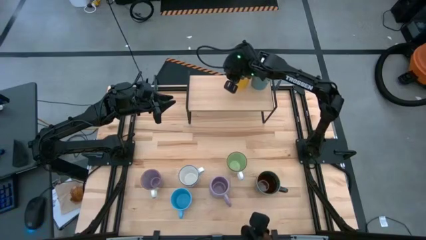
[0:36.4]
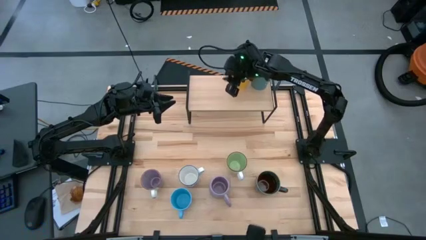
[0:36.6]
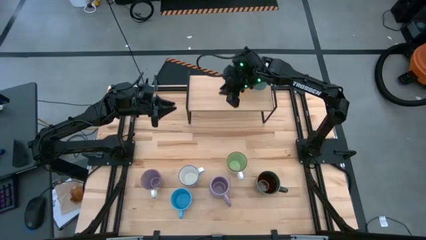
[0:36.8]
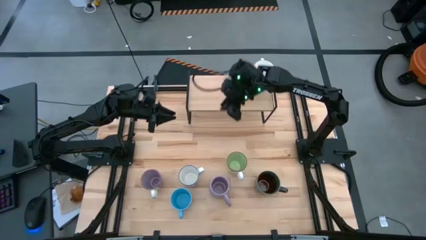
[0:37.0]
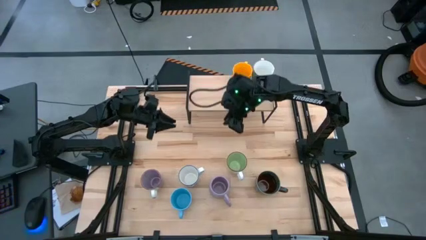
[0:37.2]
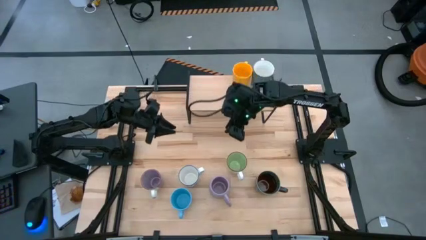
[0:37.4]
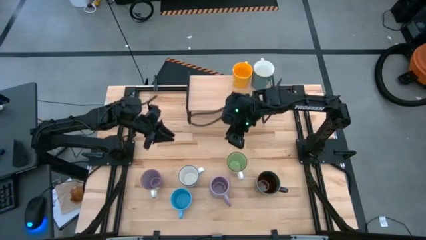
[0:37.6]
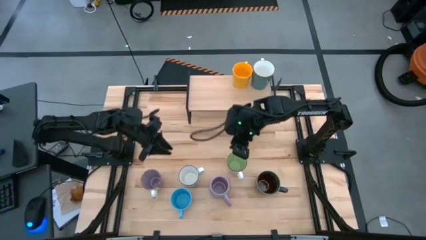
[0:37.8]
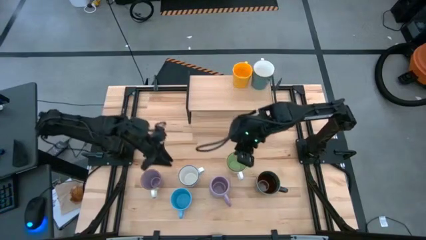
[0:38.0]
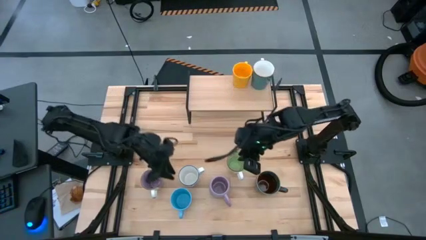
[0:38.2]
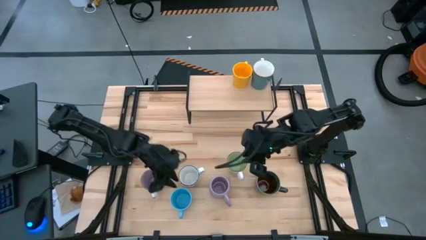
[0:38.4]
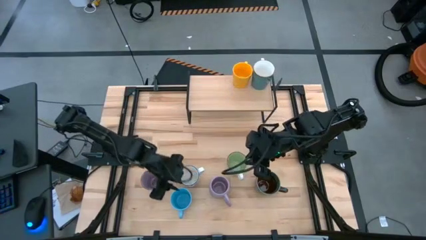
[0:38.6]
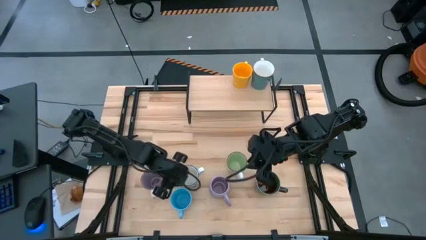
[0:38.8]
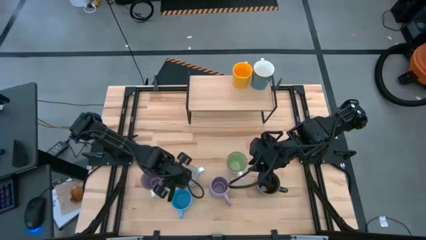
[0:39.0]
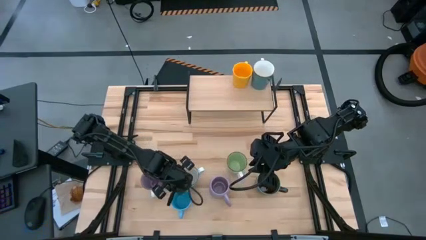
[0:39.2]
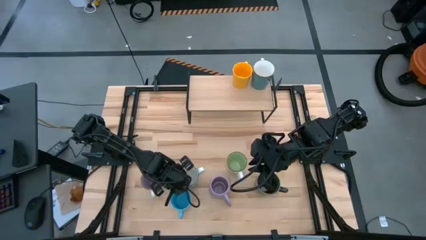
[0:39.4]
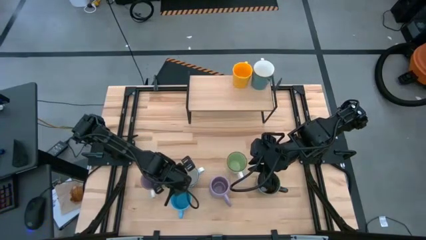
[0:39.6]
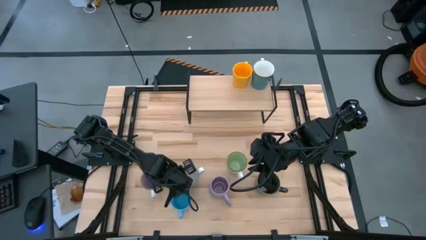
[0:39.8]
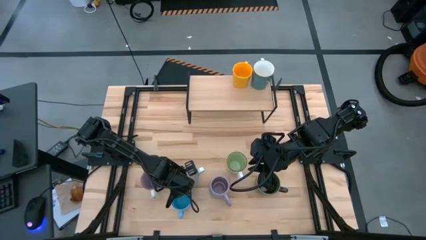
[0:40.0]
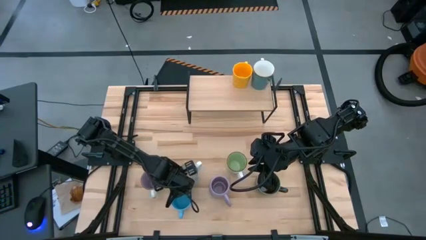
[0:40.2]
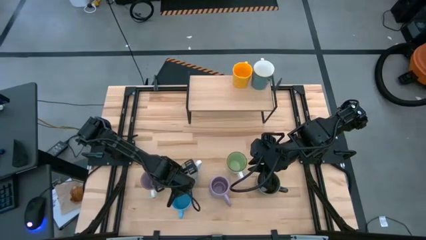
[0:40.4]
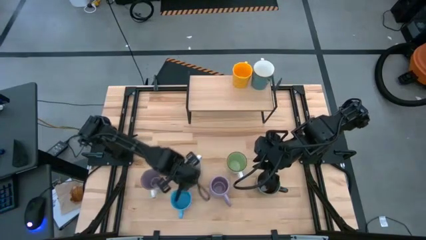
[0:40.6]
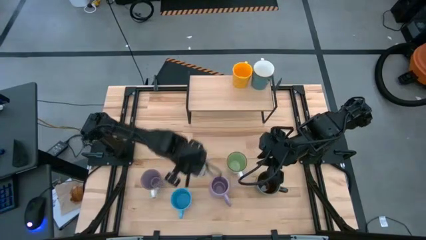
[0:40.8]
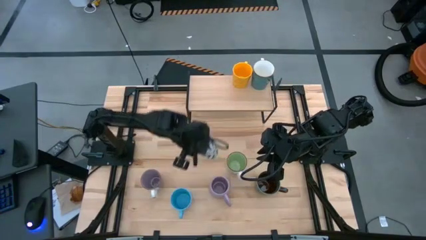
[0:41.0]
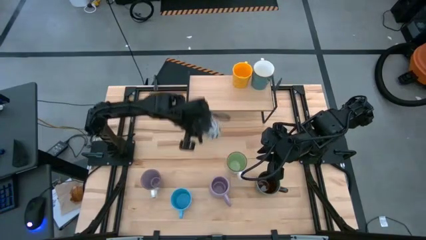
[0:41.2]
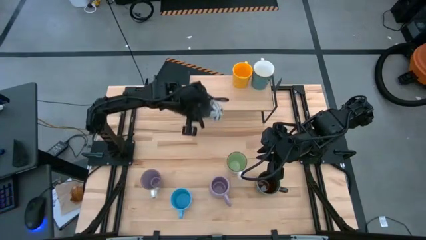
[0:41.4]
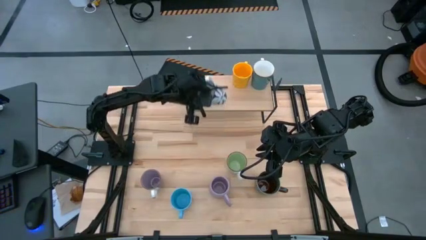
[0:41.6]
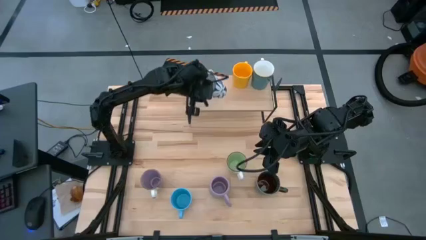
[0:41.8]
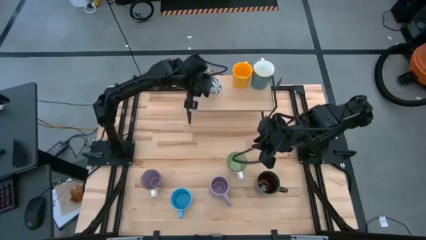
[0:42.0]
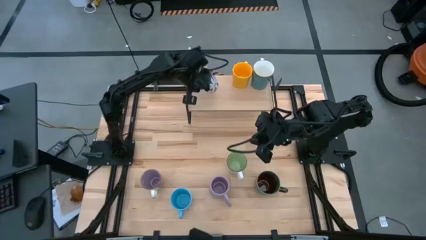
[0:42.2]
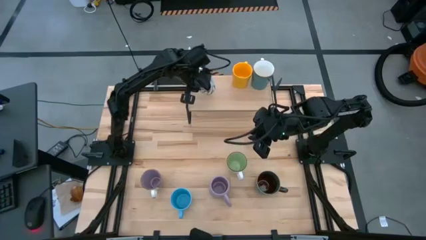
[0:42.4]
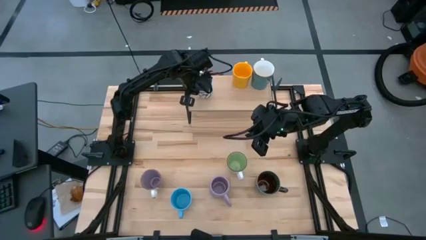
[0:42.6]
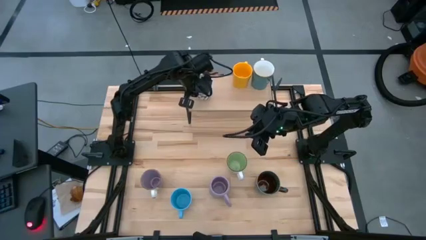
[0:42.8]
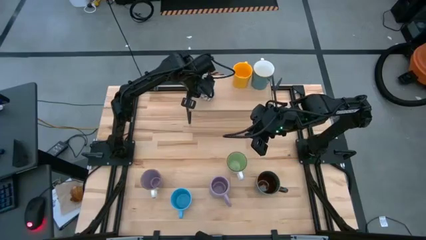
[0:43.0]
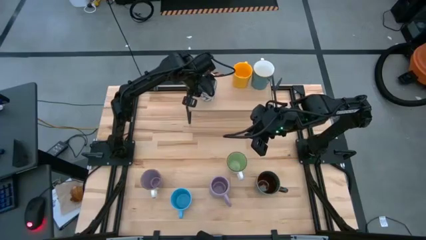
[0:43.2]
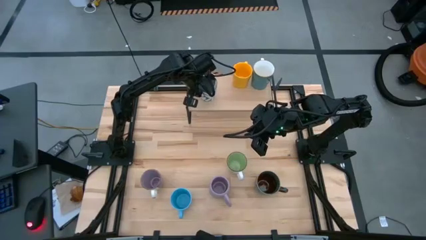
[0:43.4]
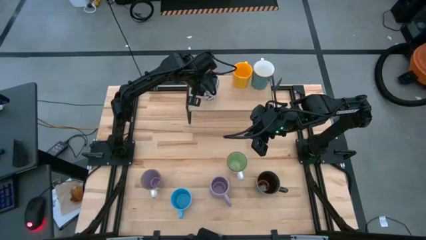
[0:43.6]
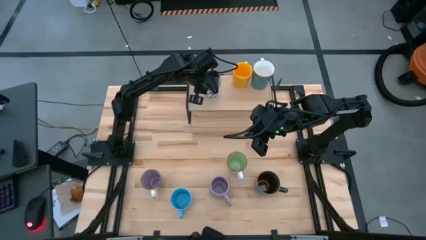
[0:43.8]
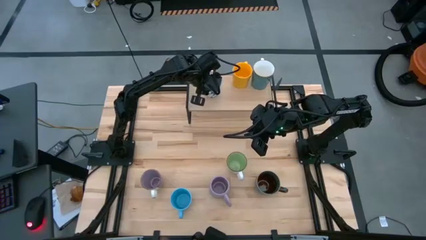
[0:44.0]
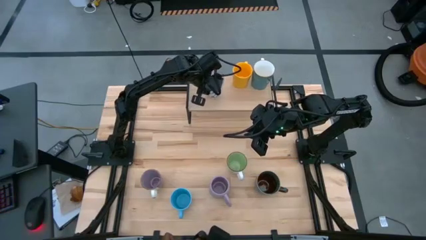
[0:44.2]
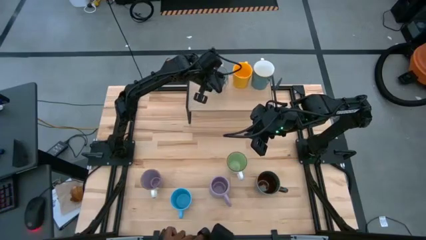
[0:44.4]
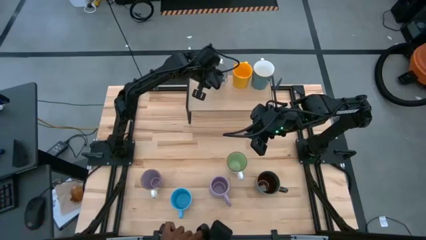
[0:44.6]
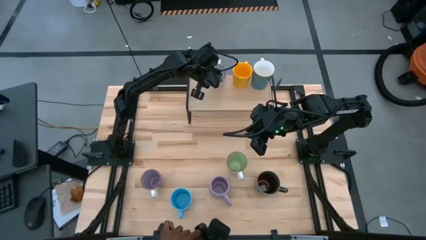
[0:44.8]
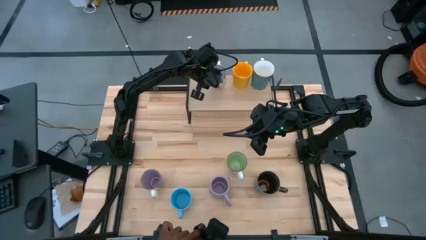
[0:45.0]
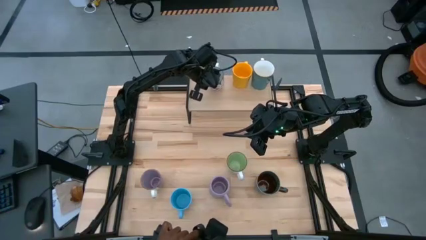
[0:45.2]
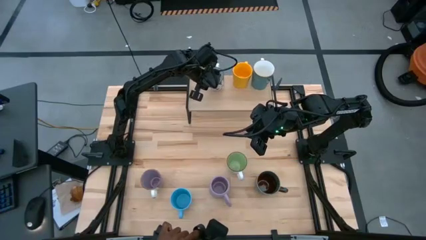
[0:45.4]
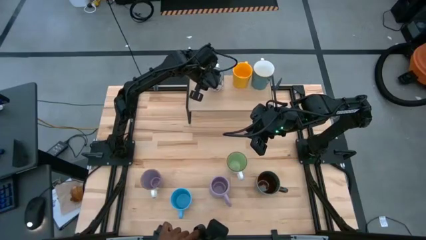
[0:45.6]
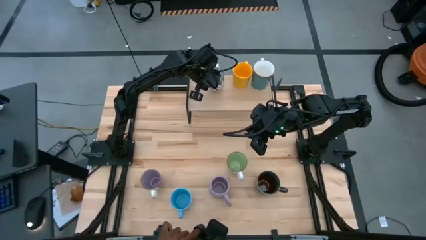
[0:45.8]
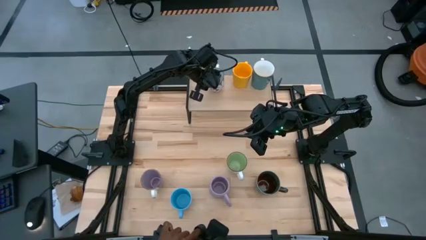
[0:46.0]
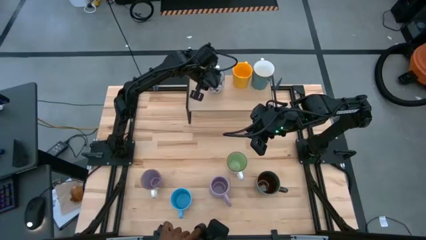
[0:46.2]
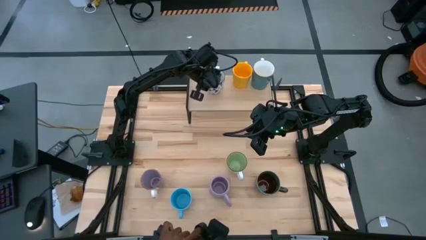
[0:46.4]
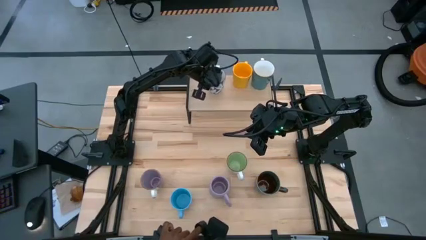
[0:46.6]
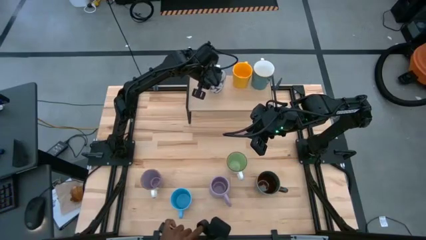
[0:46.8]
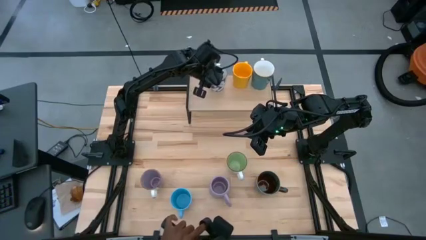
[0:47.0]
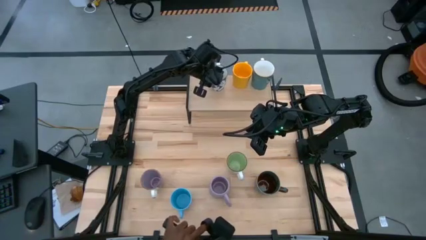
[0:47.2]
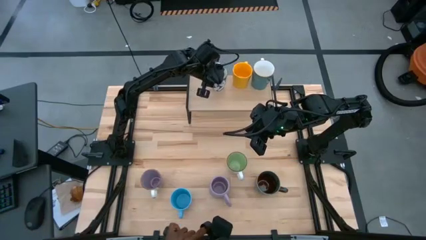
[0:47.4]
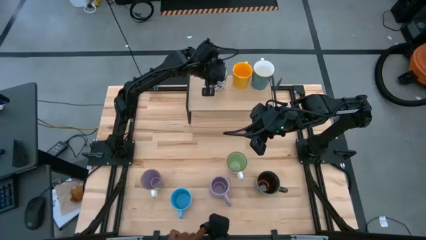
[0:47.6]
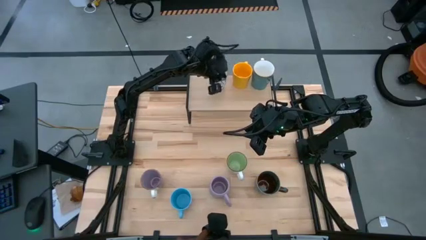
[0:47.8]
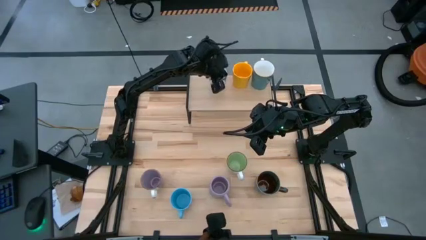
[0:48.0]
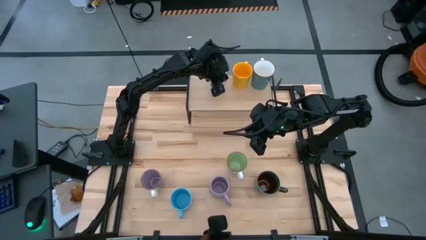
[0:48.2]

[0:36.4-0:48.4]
Task: Place coffee mugs
Put the white patterned mug on the shelf

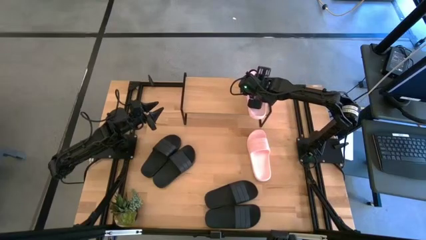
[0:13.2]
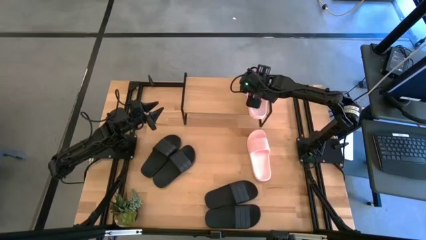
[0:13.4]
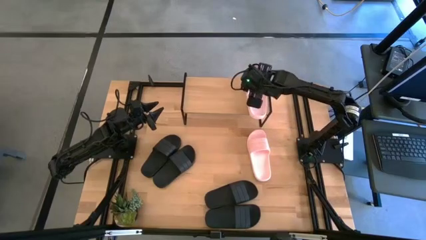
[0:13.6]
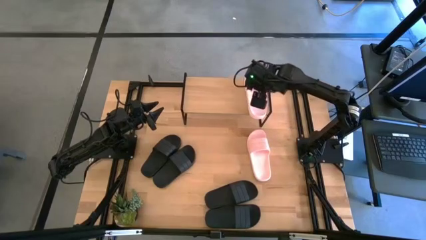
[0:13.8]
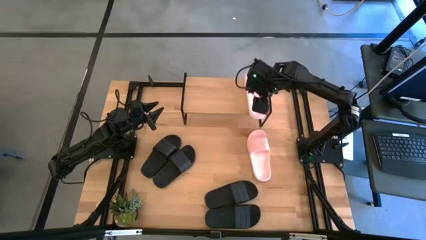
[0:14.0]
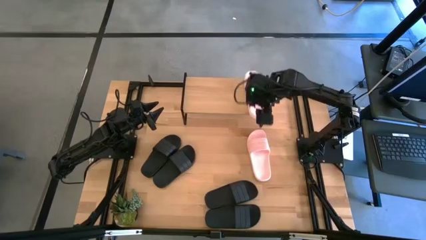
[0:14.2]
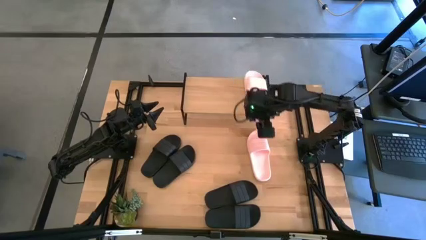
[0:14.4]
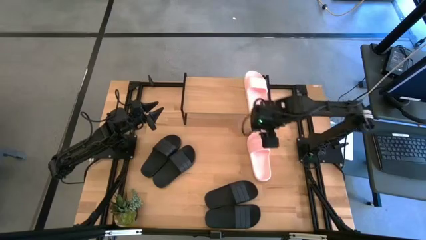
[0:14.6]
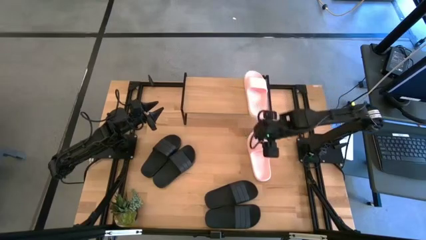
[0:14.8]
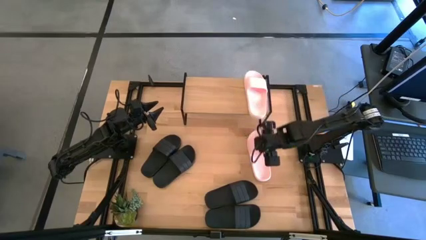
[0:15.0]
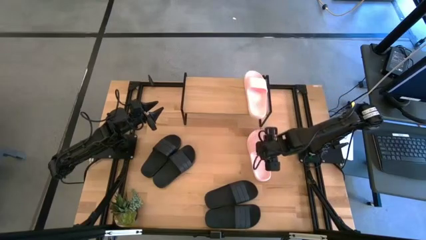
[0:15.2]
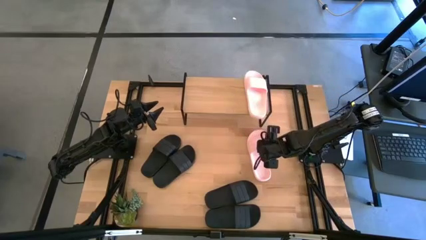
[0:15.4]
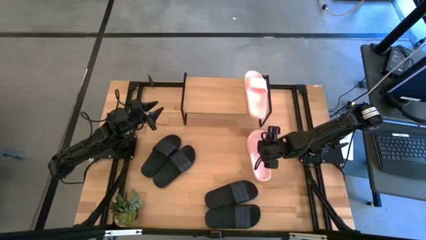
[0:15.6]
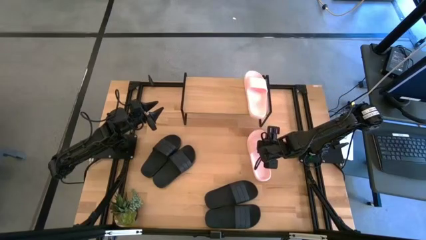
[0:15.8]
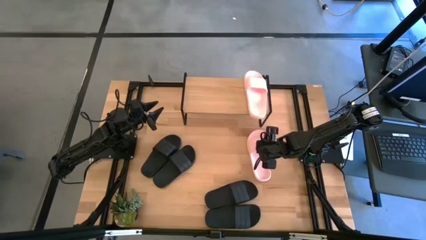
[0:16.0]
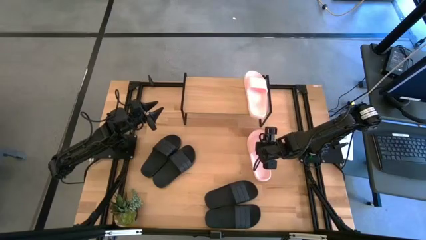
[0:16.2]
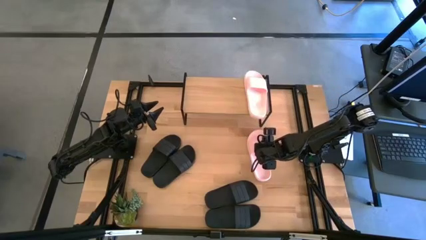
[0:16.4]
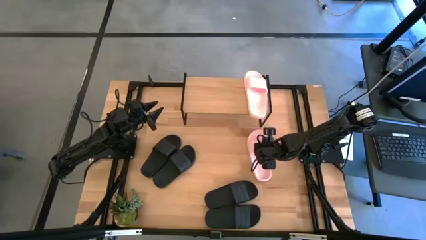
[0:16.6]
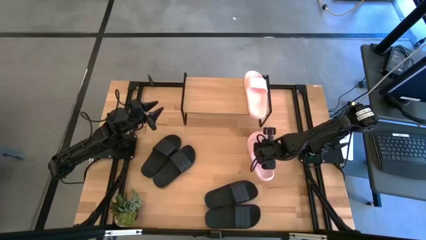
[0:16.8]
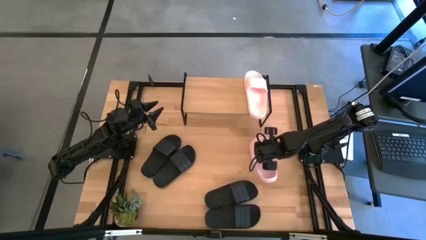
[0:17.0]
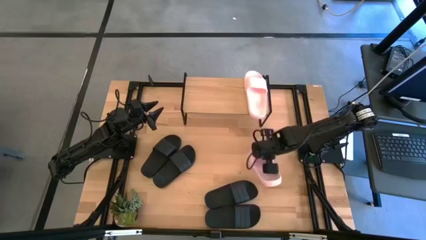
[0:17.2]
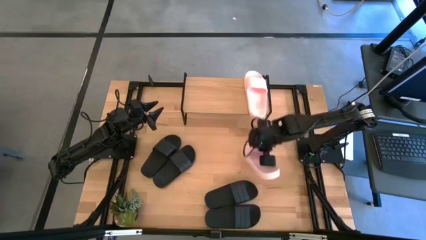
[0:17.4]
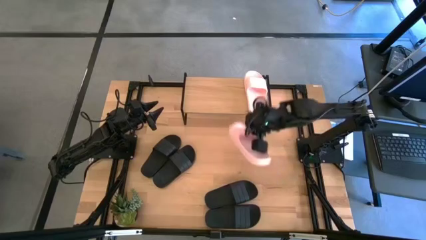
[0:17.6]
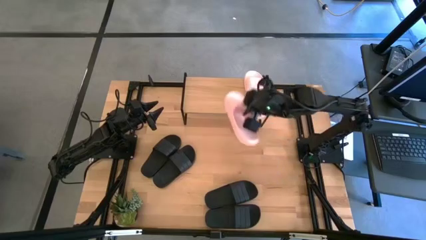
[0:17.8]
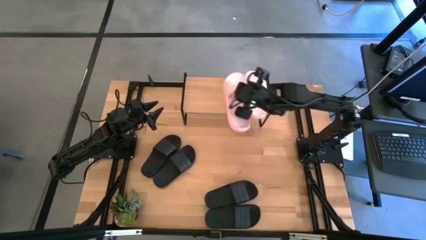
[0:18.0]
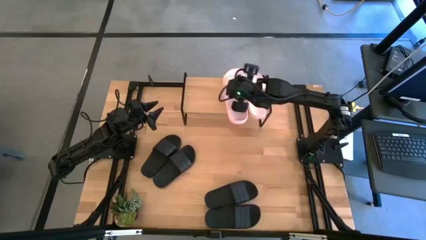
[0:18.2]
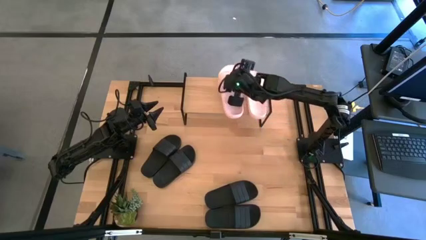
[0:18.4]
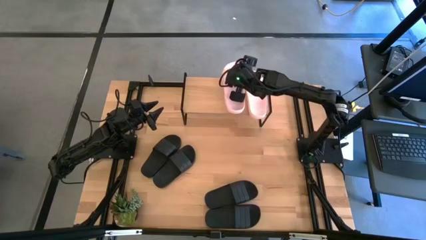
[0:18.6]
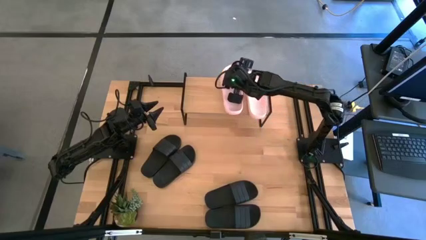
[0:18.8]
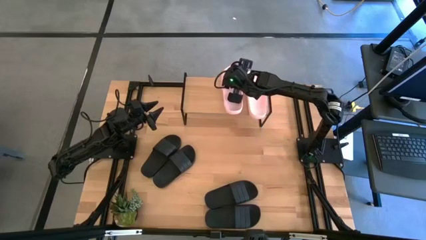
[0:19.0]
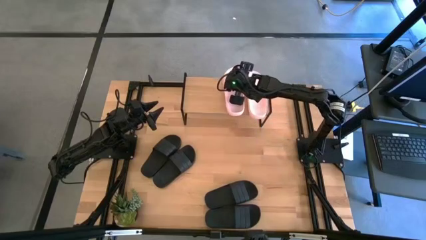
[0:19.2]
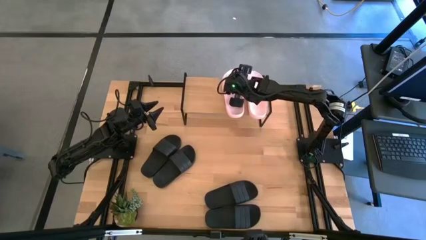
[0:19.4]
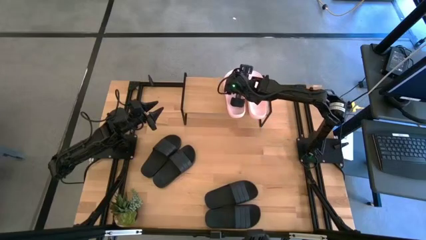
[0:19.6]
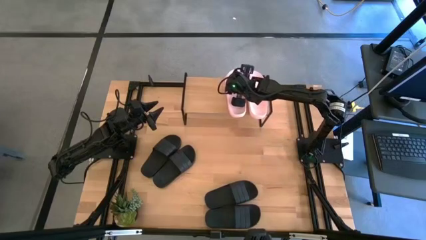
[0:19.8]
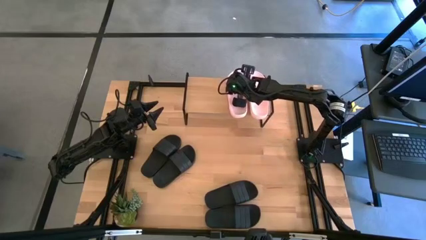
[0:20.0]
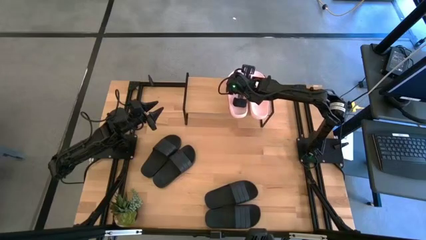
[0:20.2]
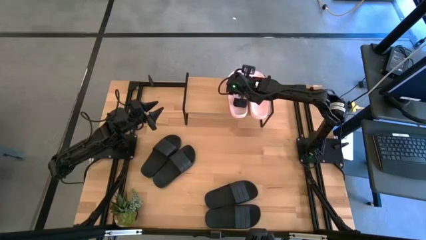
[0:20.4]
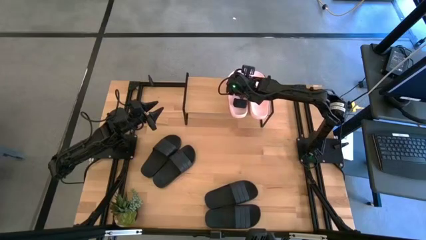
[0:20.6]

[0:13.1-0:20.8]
Task: Pick and place slides into the shelf
Put the pink slide on the shelf
